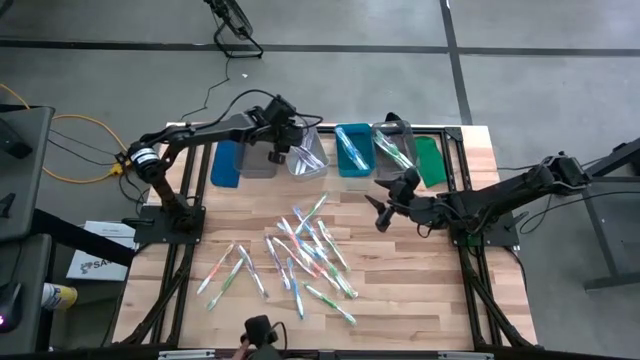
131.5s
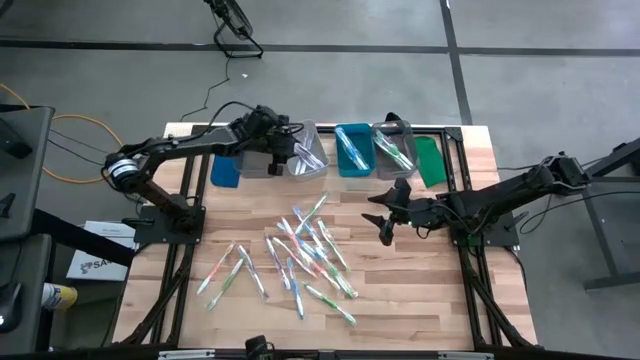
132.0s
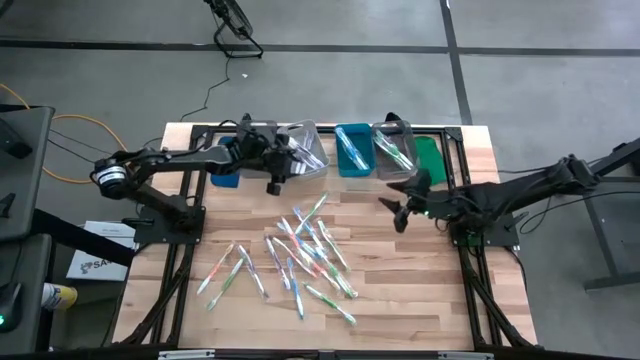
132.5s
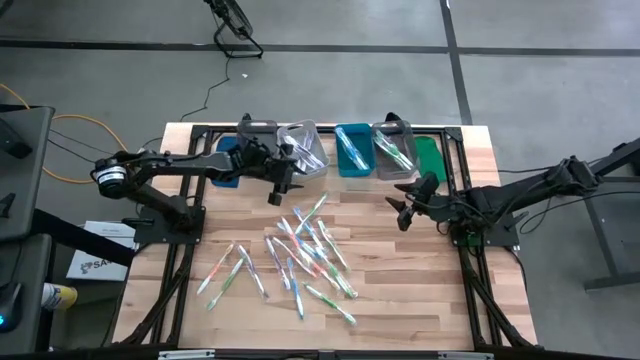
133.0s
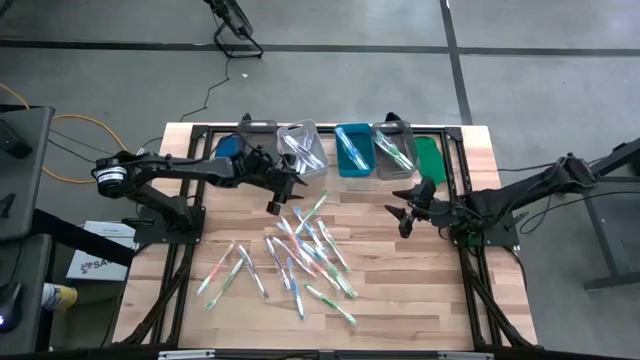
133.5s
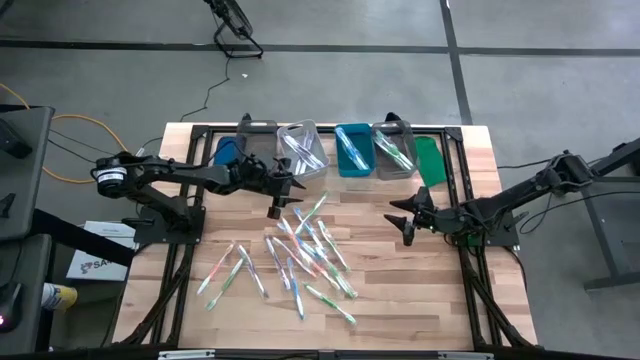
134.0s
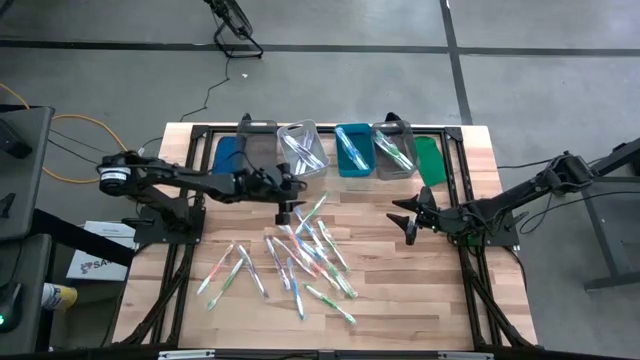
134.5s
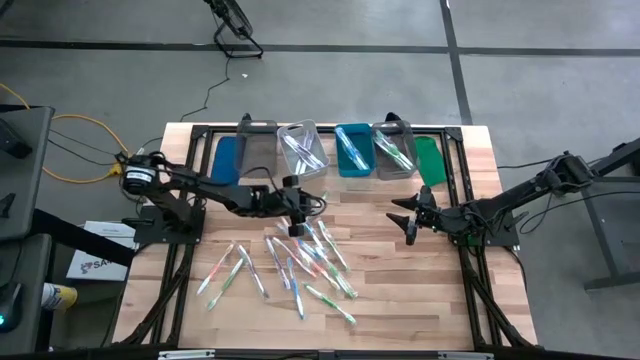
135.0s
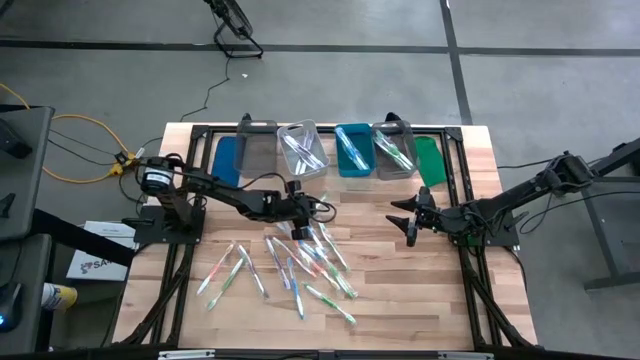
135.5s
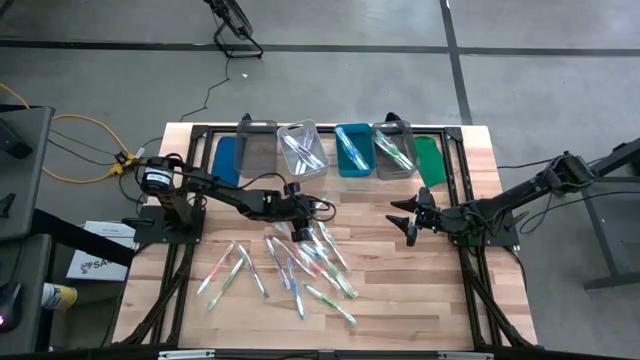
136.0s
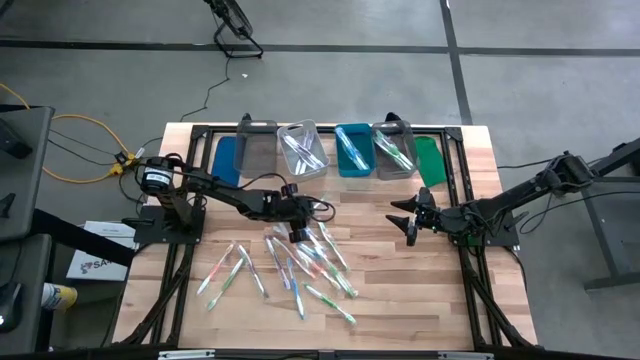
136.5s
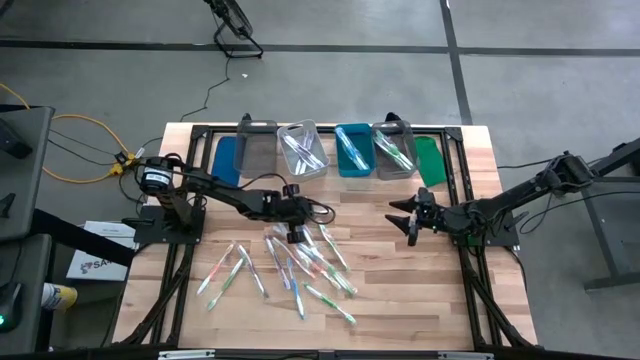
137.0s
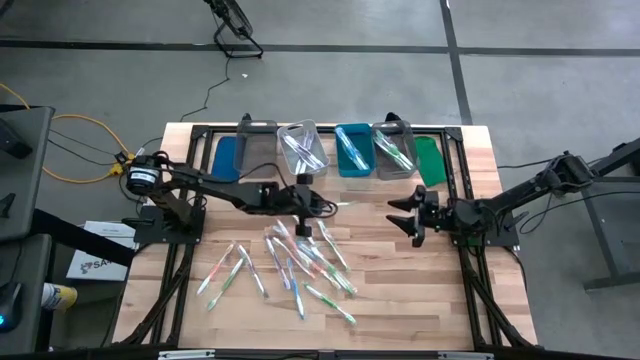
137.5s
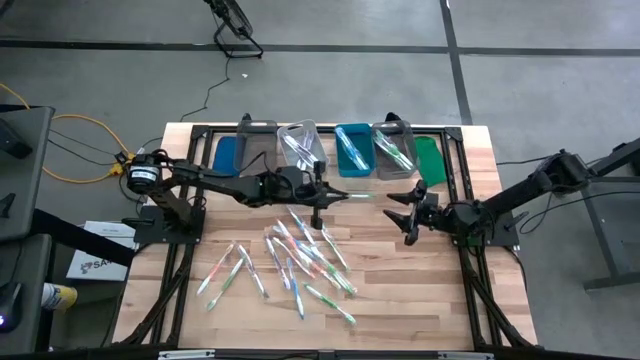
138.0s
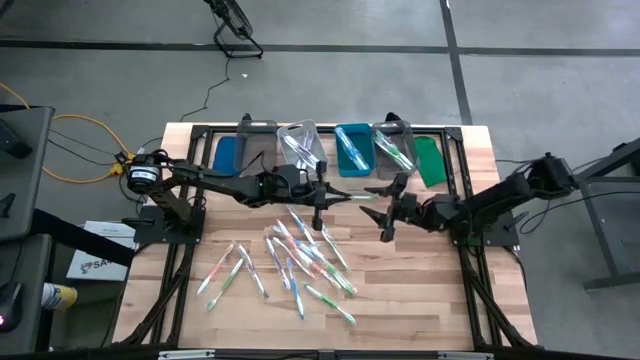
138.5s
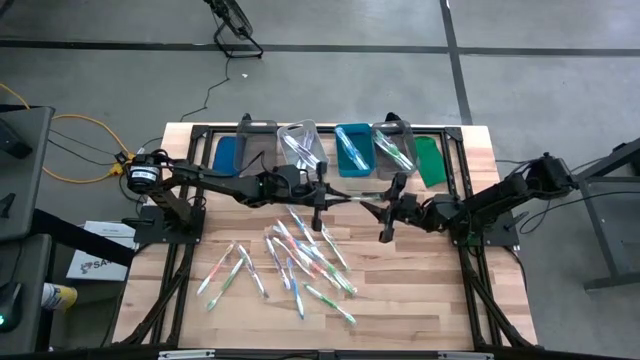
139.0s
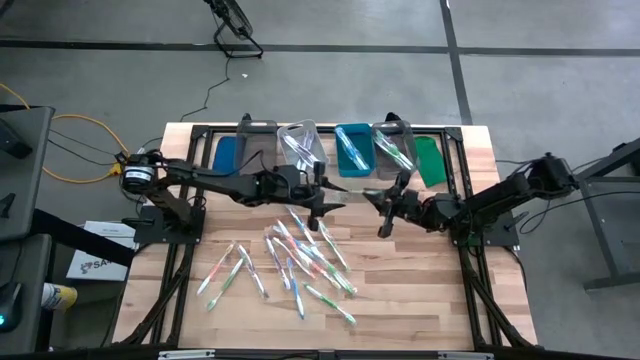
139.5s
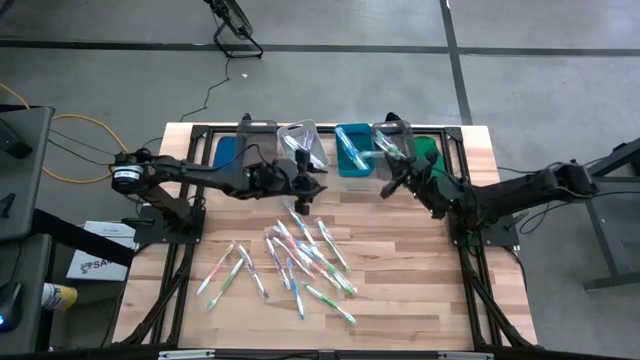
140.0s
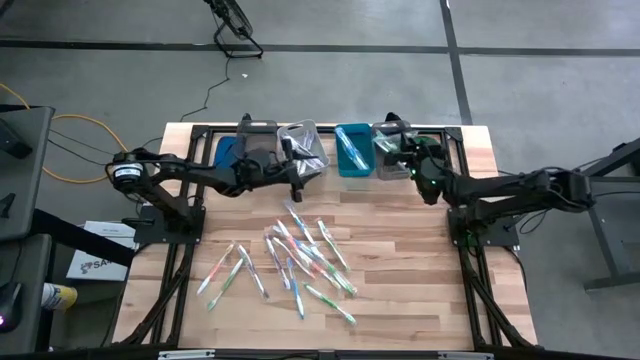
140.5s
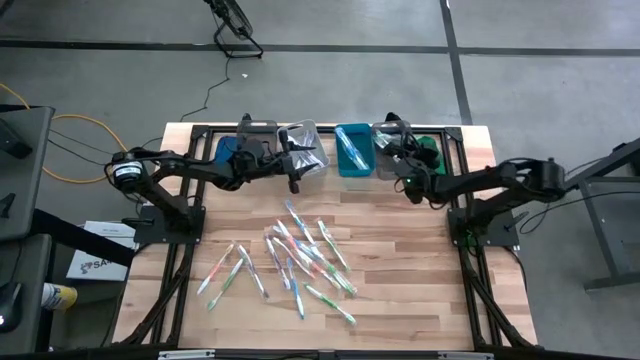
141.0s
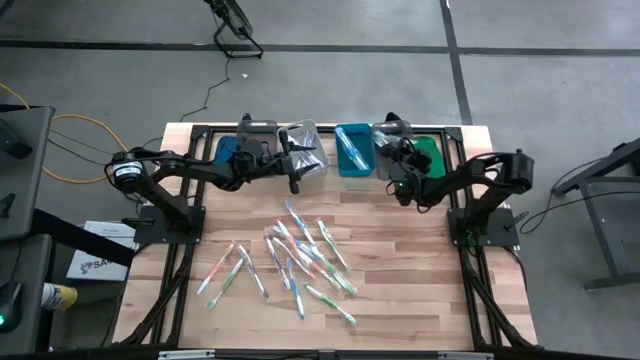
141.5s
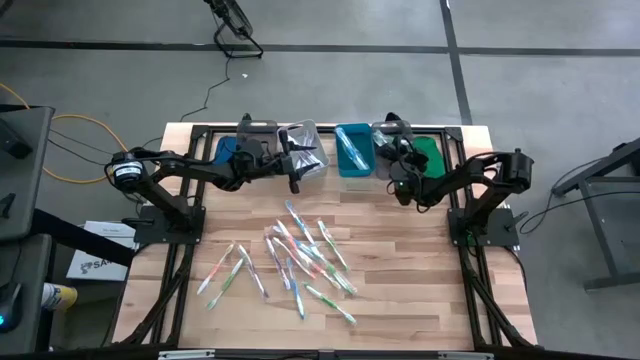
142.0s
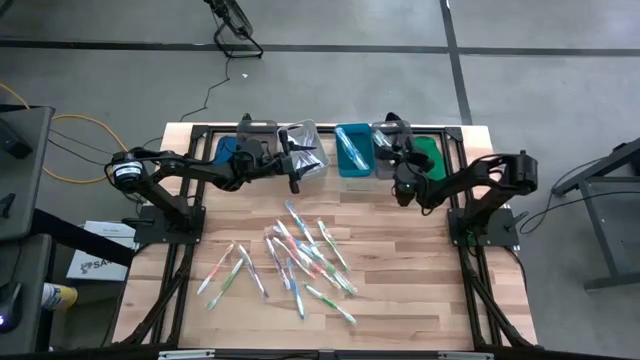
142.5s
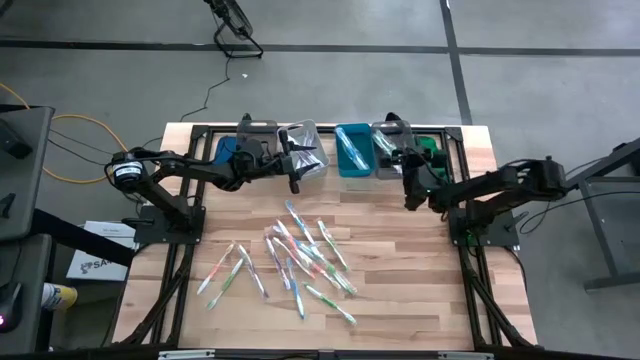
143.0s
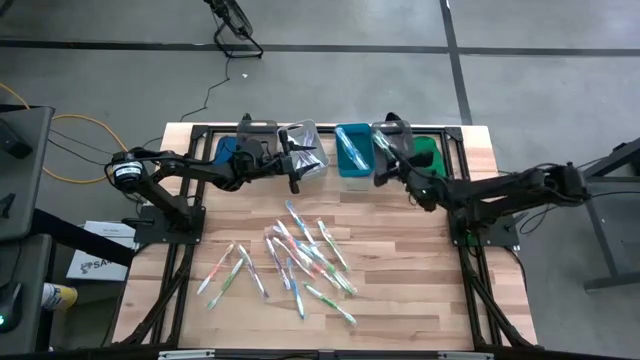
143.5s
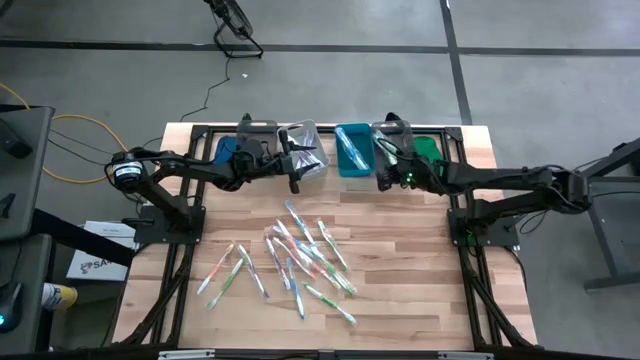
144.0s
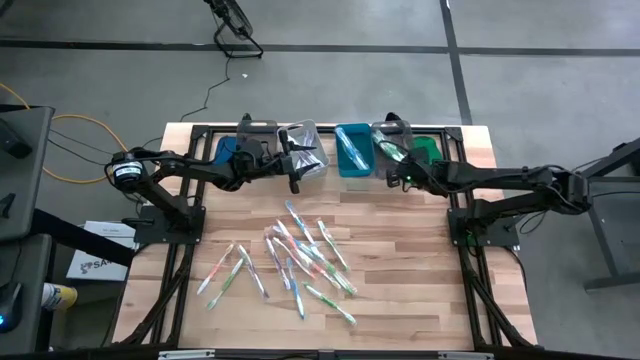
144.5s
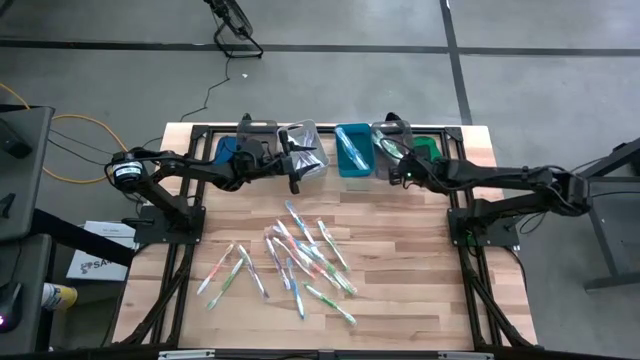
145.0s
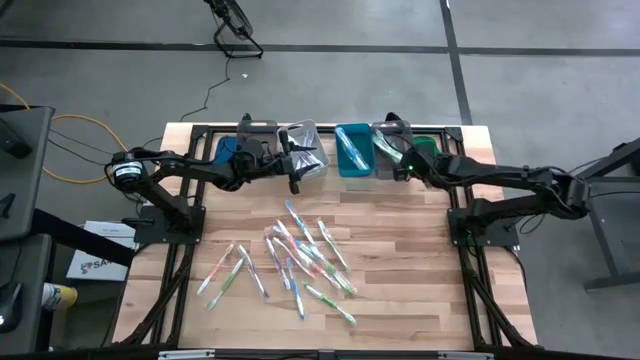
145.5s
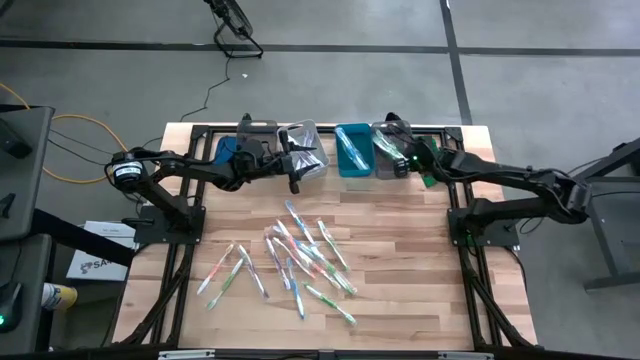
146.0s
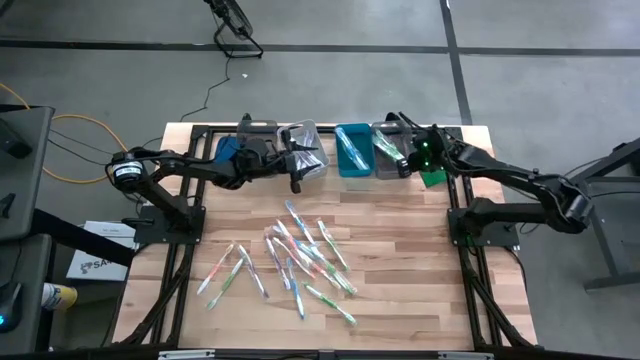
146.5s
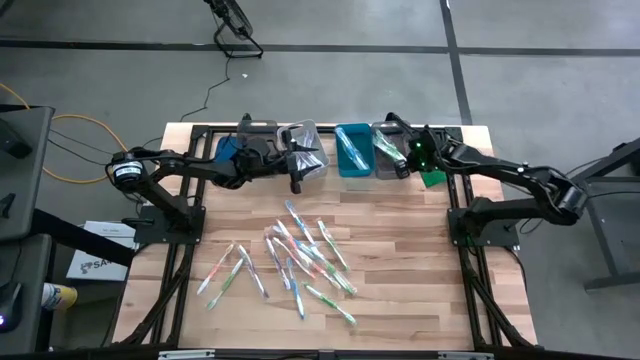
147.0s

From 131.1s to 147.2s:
Task: Pick & Place Toothbrushes
Put the green toothbrush into the right black bin

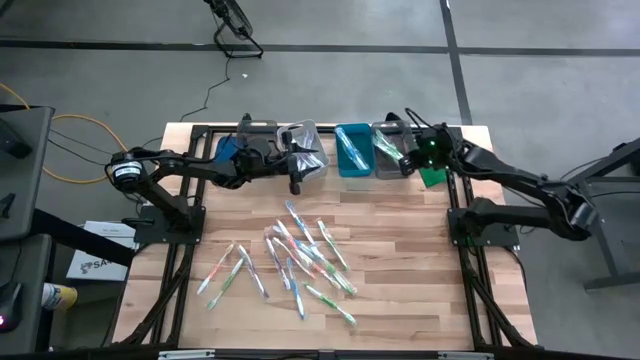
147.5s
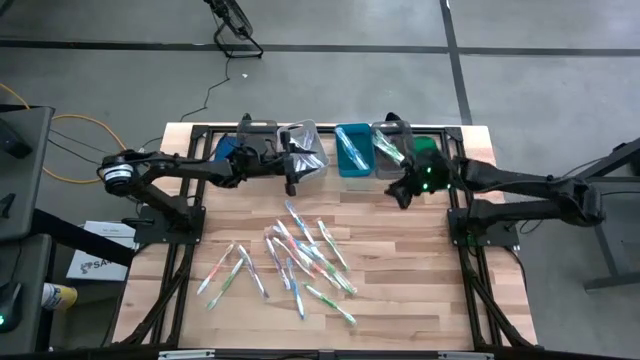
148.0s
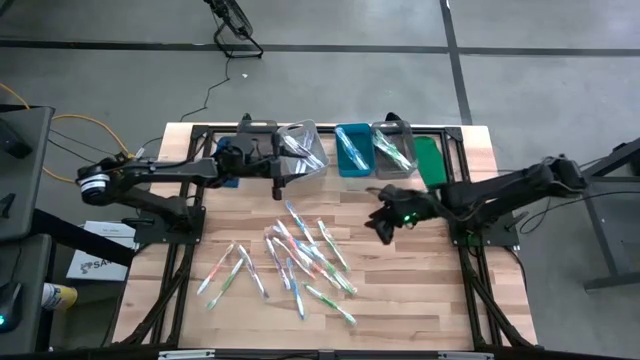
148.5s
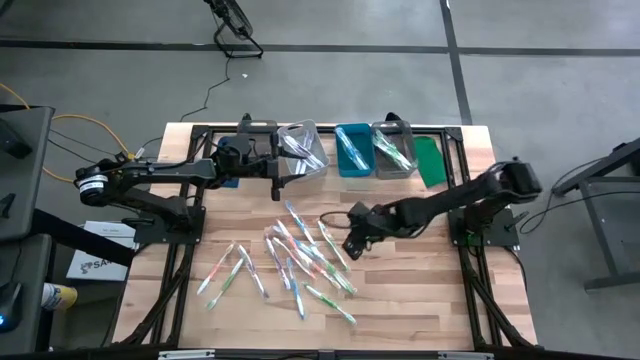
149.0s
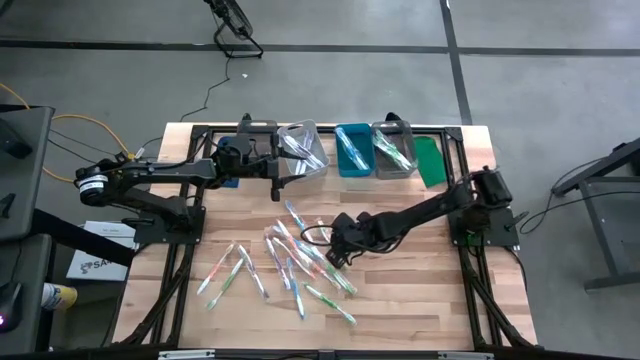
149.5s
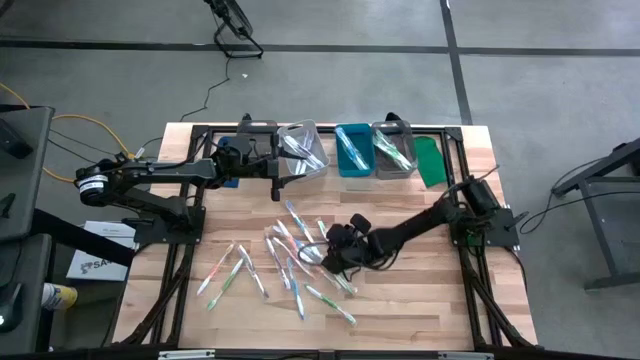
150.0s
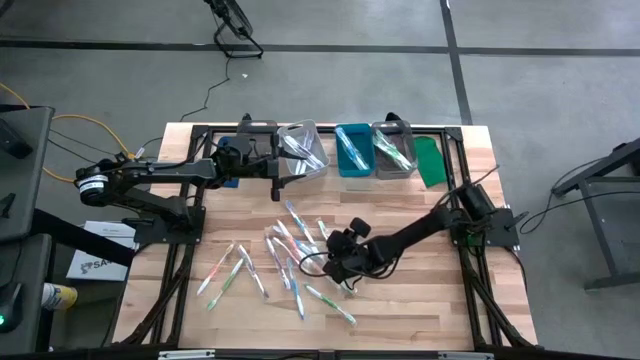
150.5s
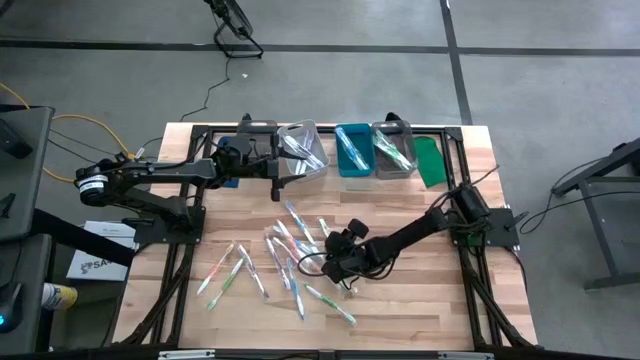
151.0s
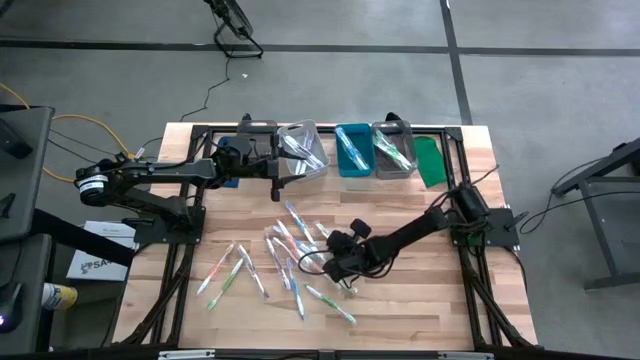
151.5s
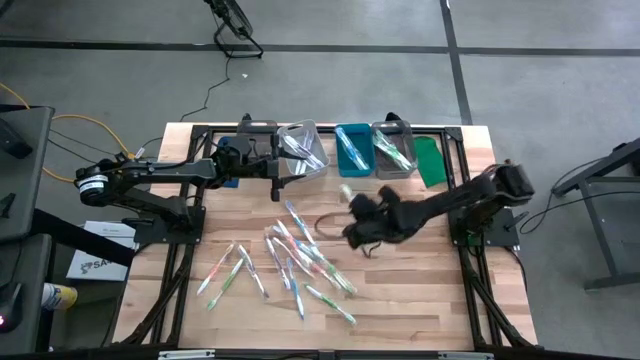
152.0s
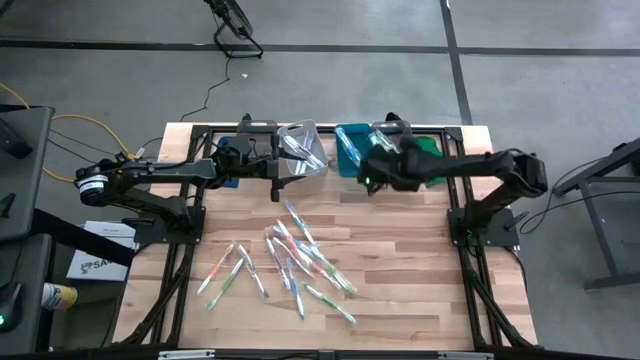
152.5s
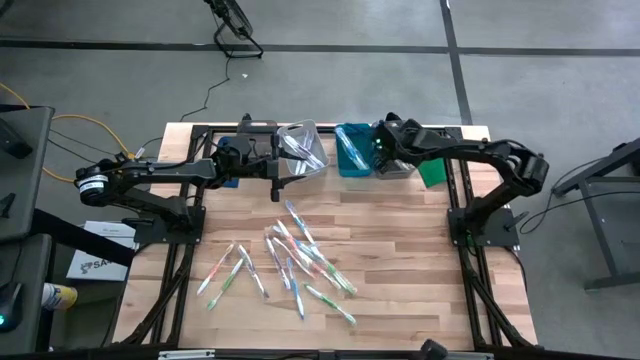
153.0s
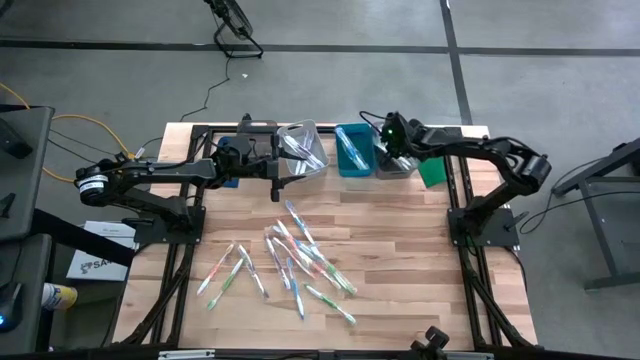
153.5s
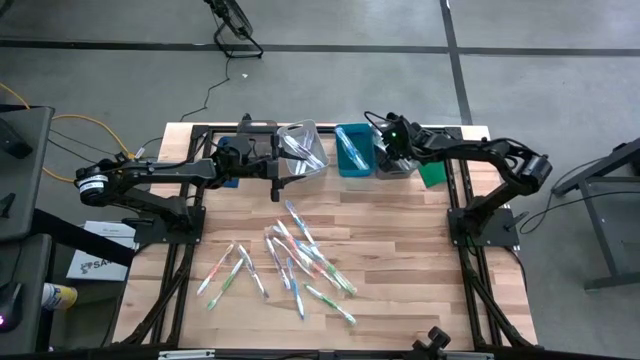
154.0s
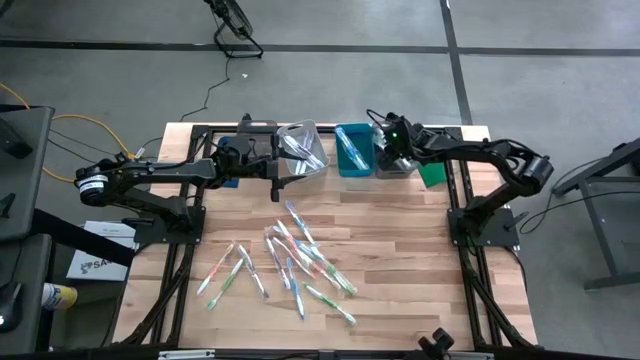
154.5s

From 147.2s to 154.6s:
Put the green toothbrush into the right black bin
